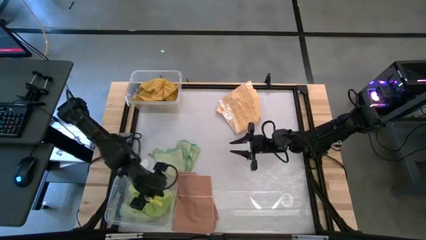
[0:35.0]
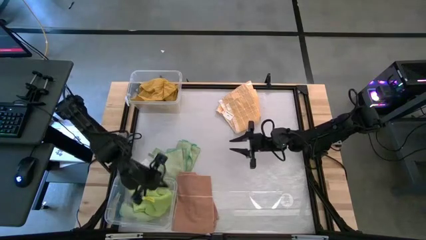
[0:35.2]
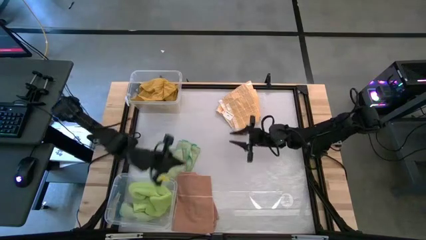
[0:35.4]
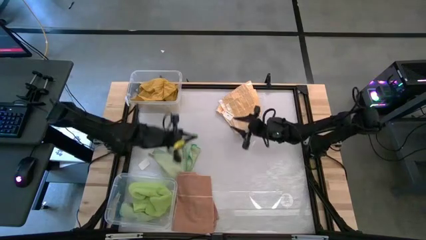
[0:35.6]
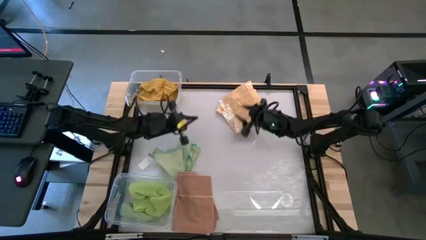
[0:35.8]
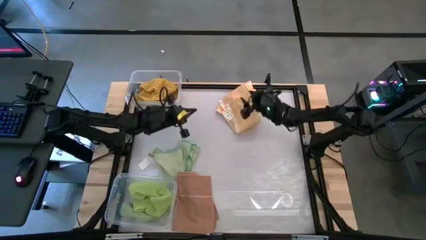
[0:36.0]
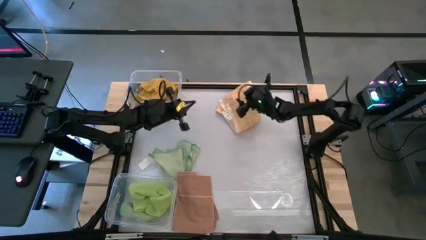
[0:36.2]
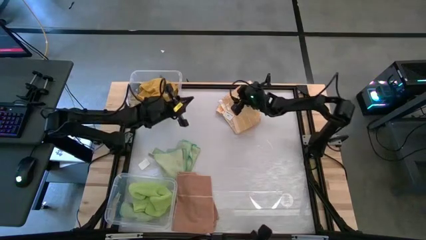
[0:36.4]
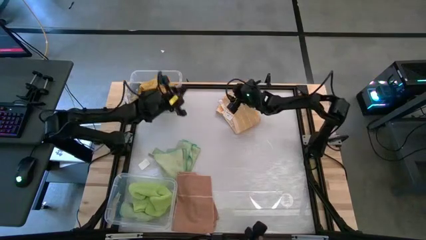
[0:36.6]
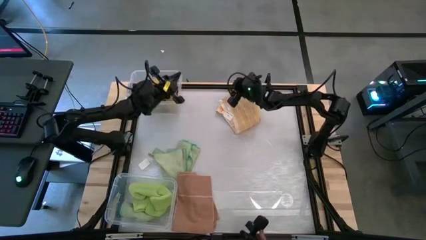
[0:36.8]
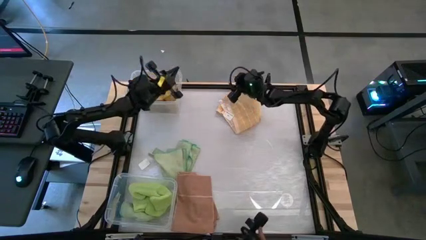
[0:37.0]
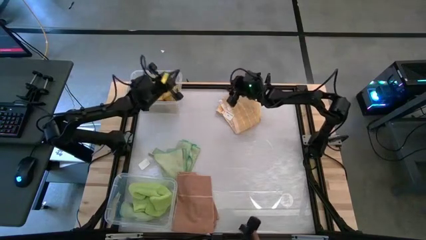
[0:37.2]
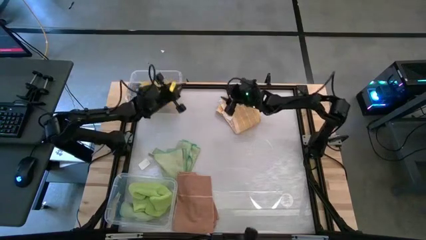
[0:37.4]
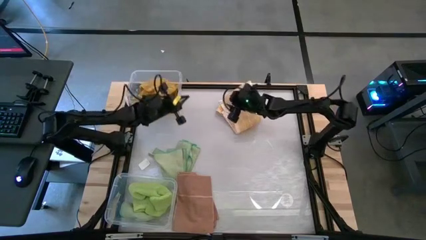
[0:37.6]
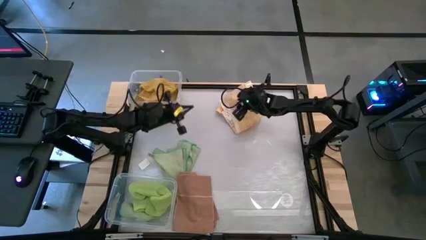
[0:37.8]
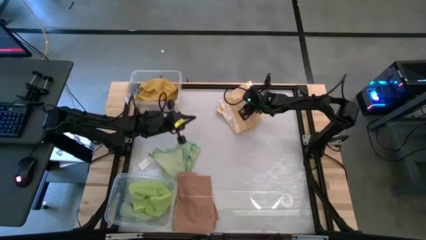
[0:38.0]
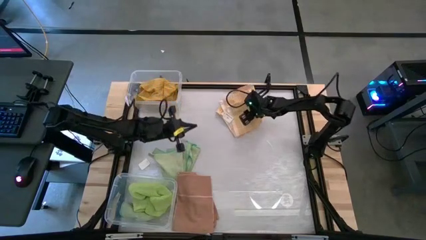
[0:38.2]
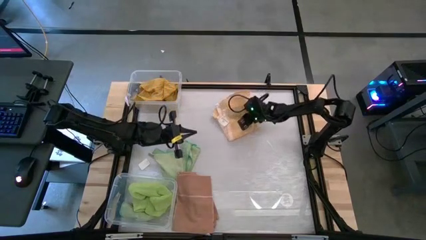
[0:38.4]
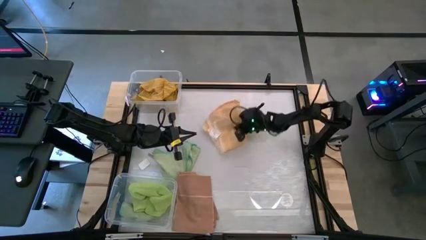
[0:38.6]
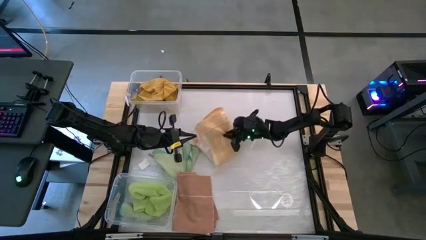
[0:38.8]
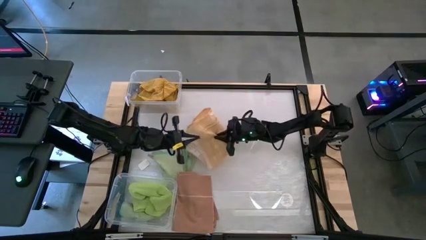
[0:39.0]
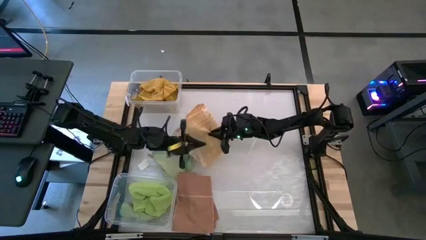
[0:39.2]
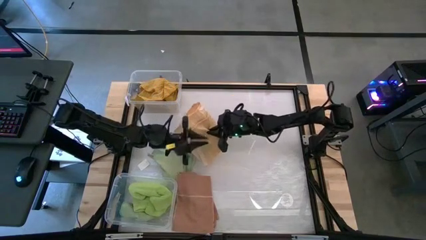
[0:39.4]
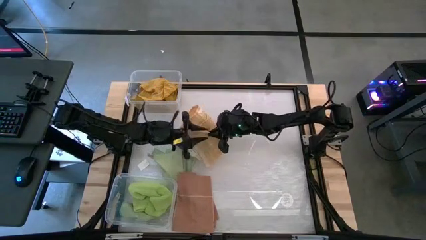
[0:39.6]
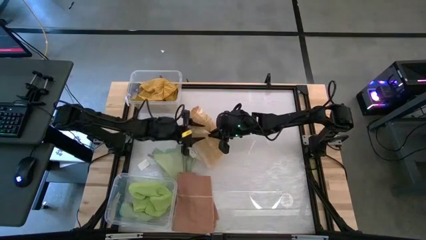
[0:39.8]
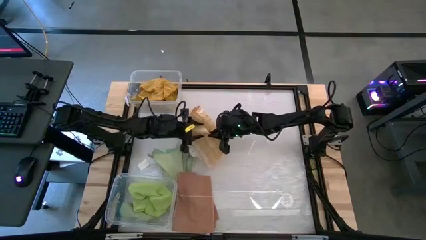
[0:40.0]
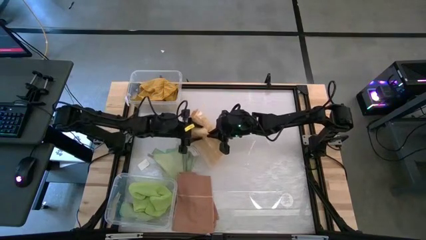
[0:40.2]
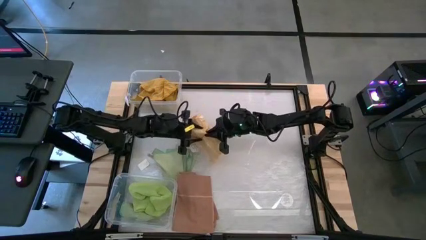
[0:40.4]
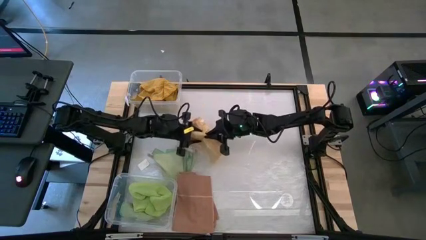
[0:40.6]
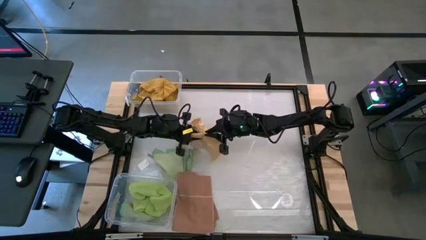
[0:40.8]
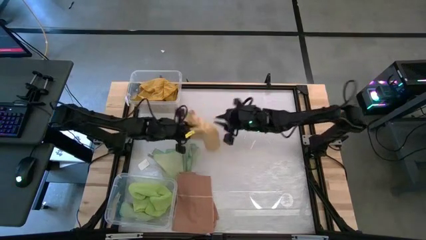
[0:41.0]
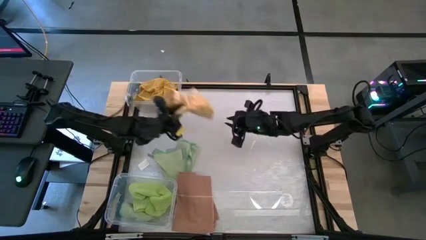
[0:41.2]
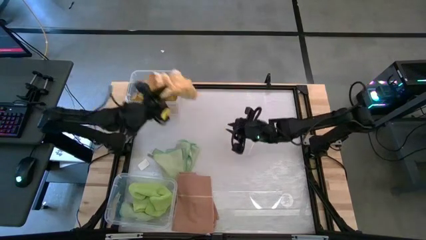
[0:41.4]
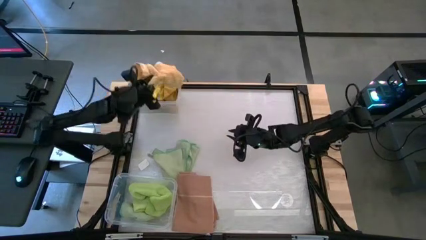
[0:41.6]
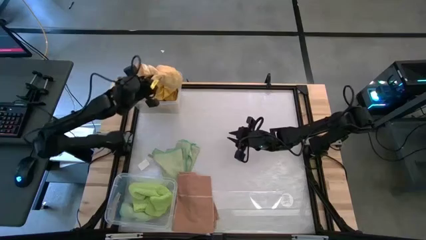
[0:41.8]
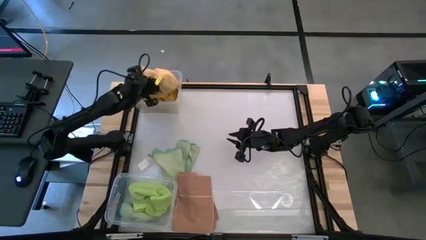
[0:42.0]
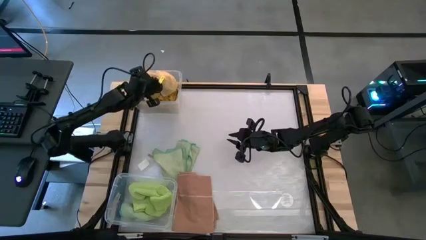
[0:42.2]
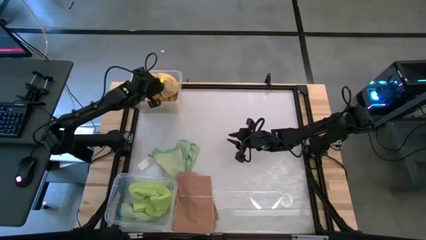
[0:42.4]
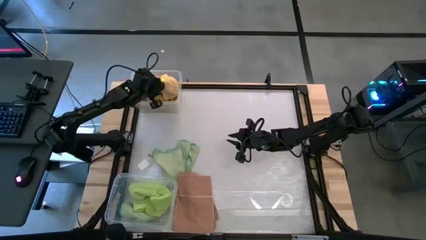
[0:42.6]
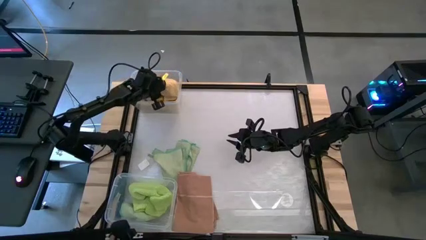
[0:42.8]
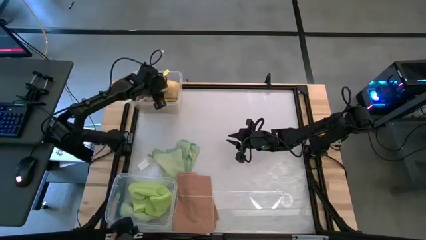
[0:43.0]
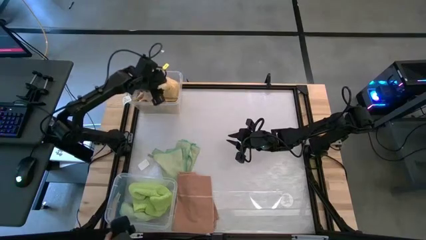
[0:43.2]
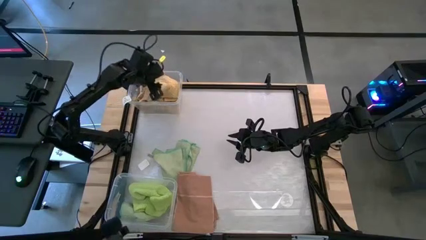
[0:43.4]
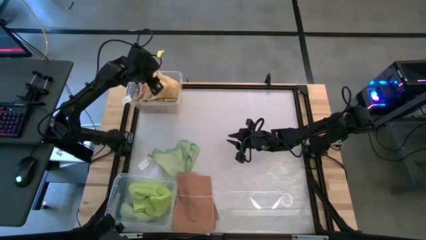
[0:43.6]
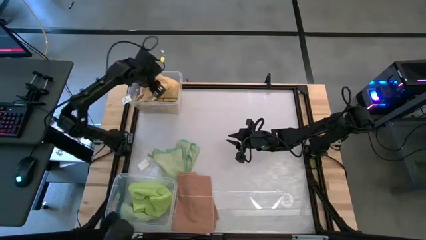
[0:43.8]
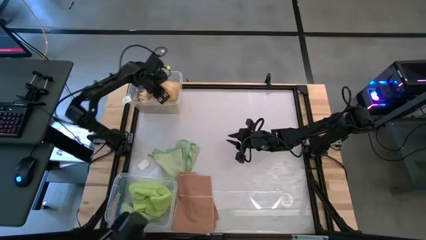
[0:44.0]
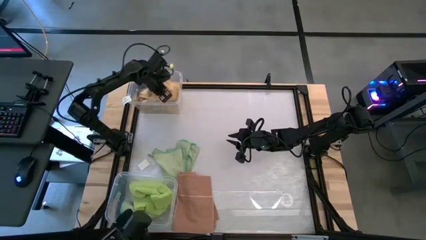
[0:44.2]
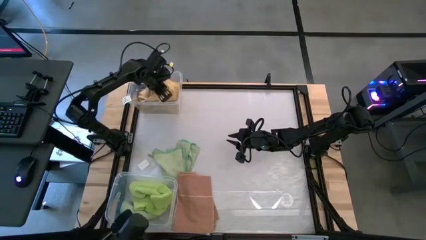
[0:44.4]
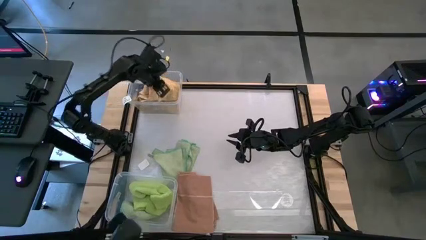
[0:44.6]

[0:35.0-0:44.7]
Task: Sort towels by color in basket
Put the light yellow towel into the top transparent bin

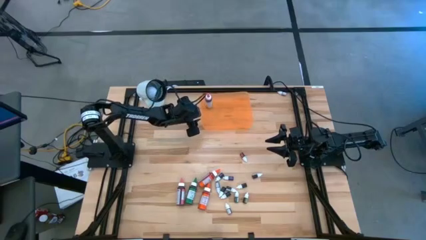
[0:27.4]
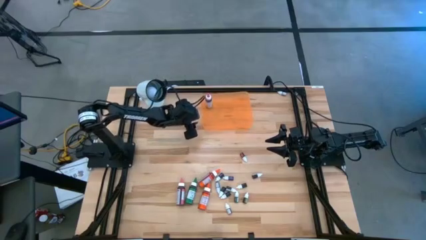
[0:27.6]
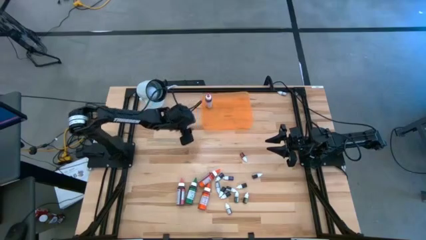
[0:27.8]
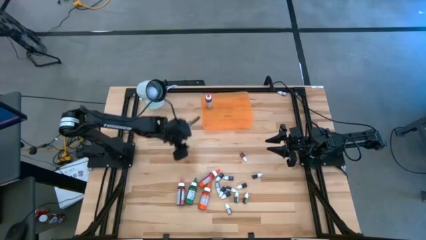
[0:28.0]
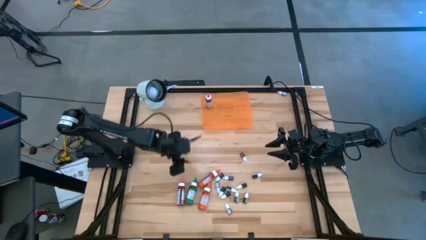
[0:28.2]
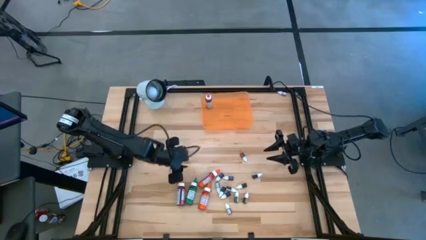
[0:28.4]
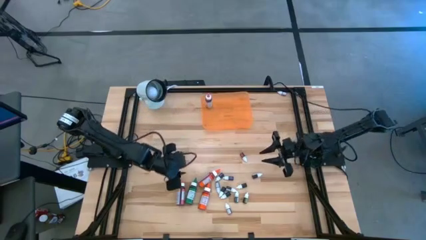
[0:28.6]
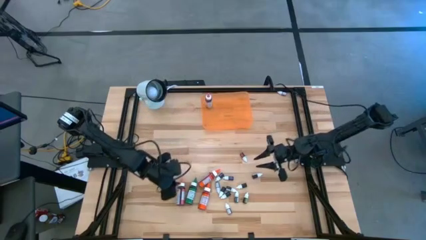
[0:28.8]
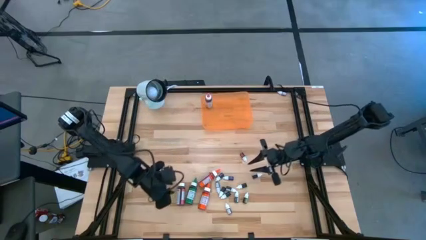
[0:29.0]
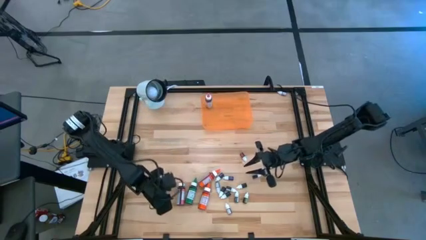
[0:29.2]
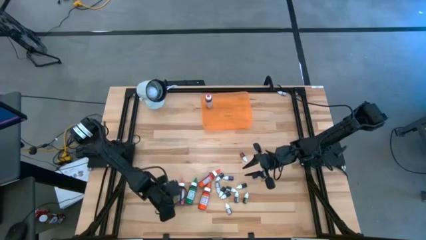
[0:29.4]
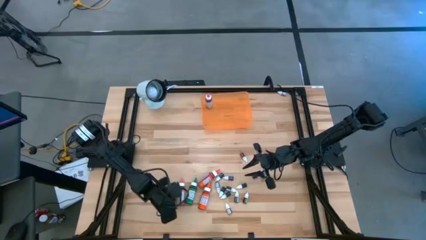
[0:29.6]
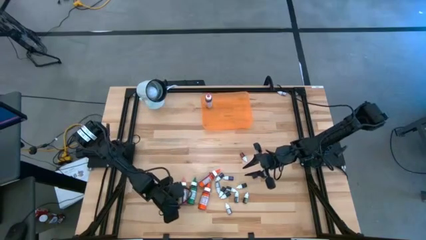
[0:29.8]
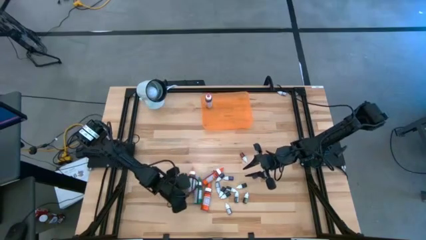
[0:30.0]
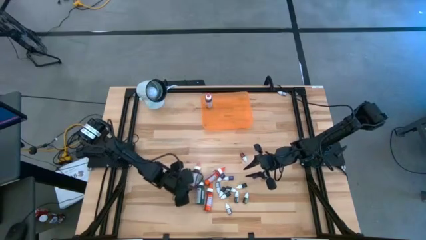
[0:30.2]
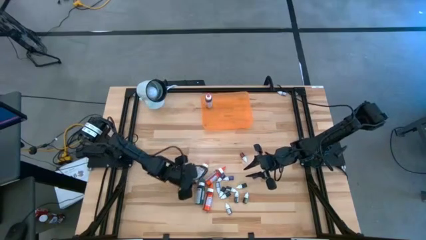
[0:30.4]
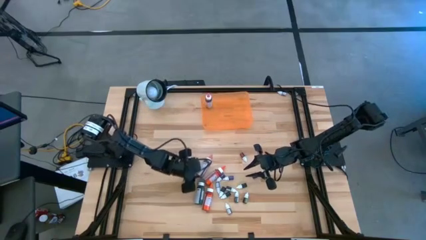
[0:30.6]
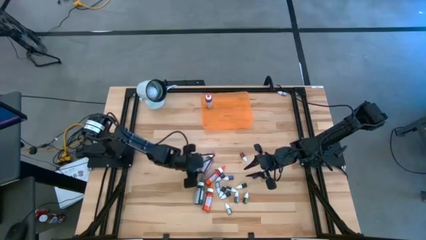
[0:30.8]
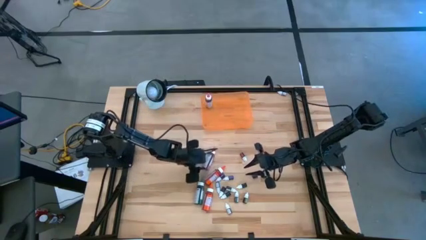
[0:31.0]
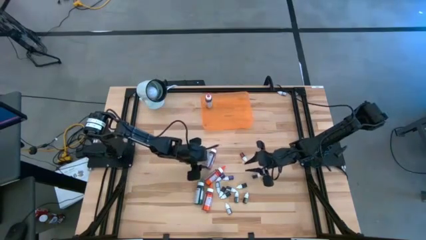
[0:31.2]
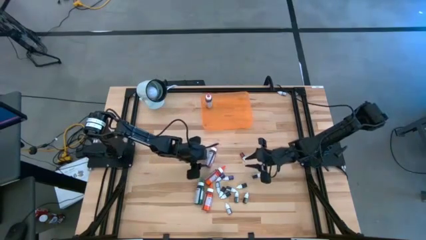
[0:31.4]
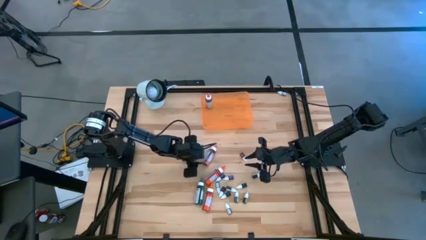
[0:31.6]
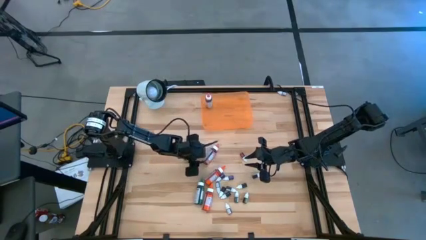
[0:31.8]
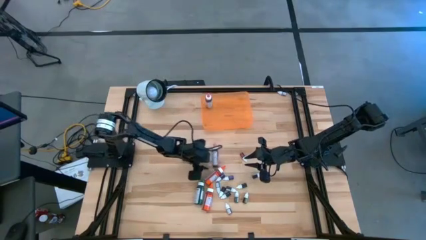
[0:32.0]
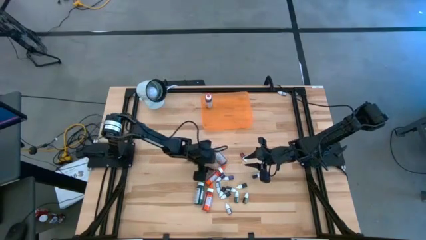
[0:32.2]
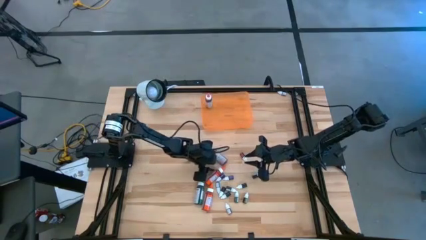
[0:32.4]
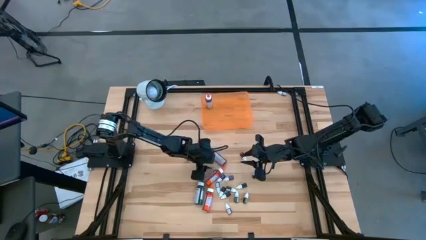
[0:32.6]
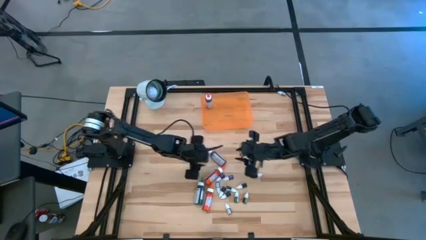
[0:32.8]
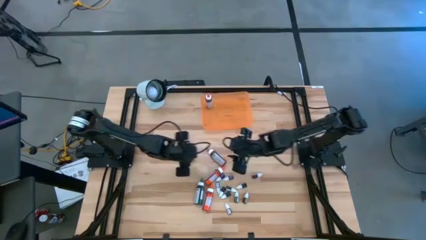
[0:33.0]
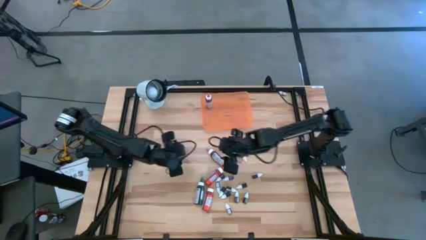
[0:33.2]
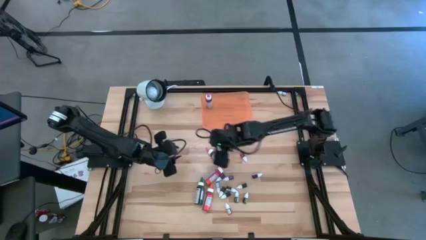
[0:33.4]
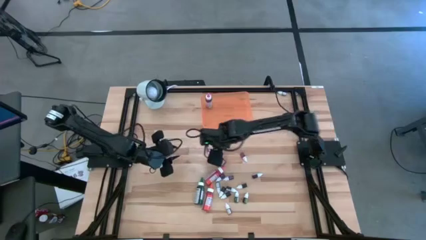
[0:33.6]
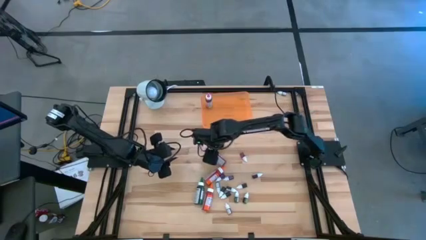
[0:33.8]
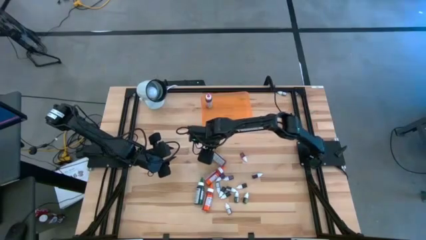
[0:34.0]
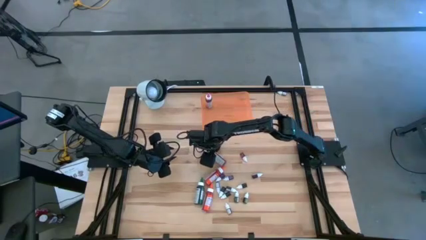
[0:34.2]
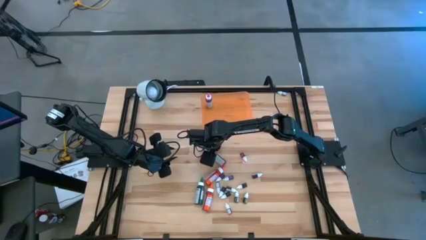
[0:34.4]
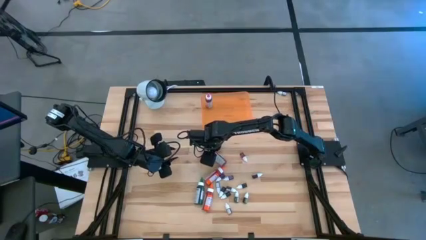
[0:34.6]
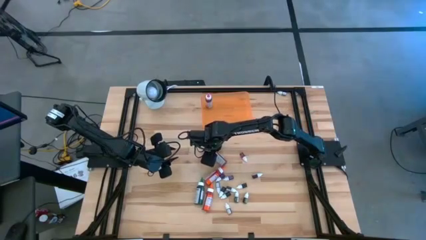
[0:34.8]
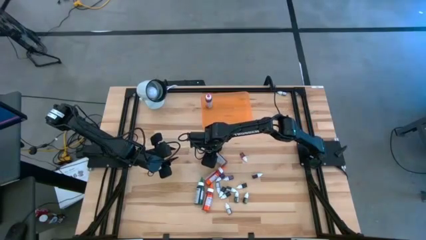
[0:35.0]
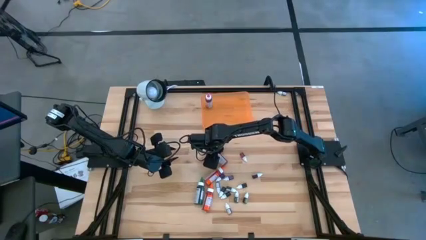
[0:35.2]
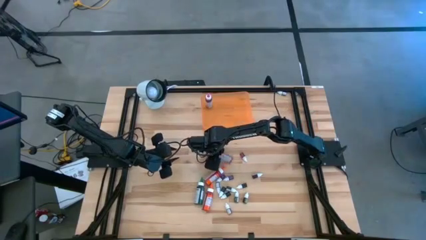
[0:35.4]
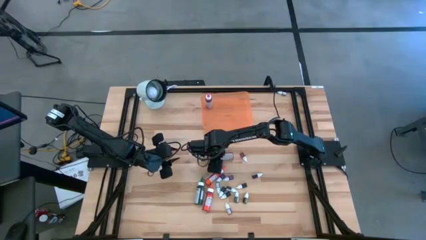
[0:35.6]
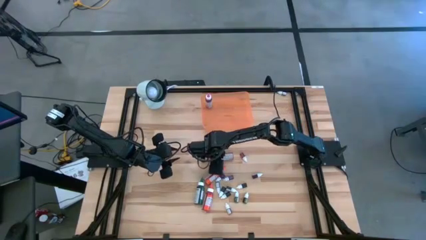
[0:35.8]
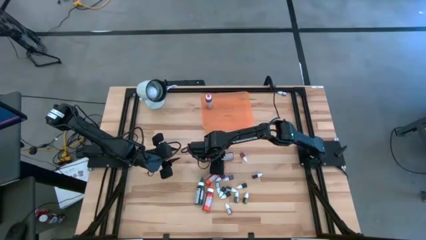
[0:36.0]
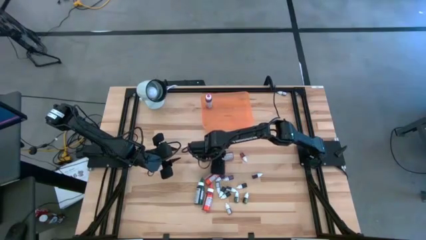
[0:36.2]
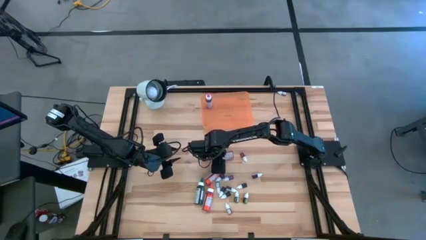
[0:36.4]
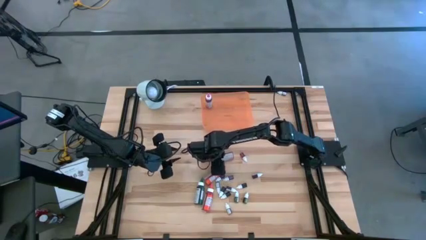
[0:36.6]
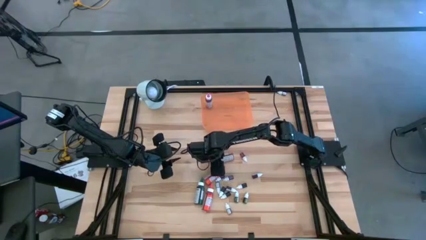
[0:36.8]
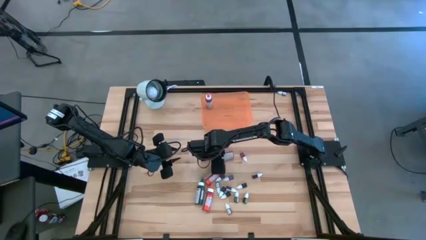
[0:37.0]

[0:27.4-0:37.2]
Task: Pick & Place food coloring
Put the large pink food coloring bottle into the orange bin
